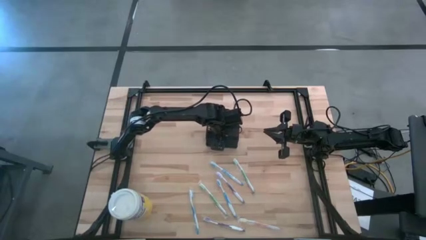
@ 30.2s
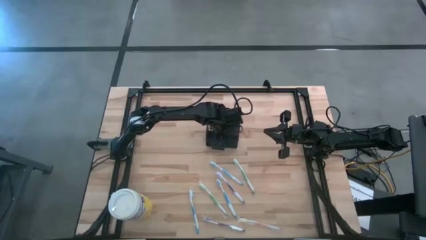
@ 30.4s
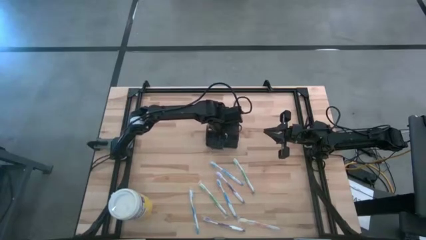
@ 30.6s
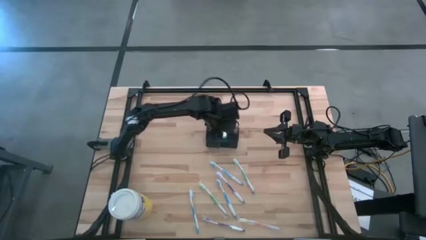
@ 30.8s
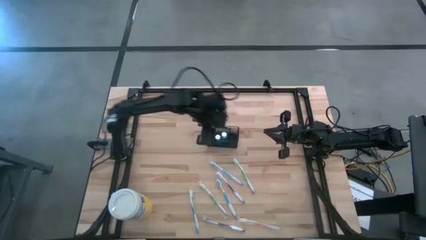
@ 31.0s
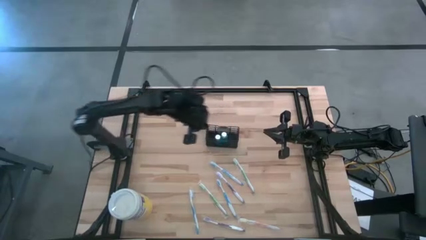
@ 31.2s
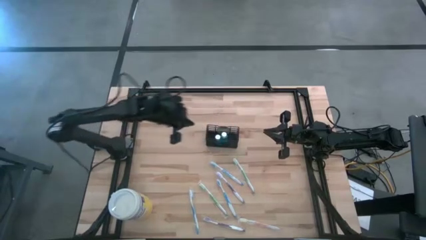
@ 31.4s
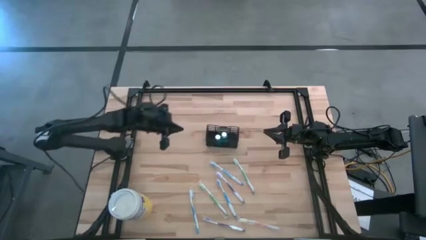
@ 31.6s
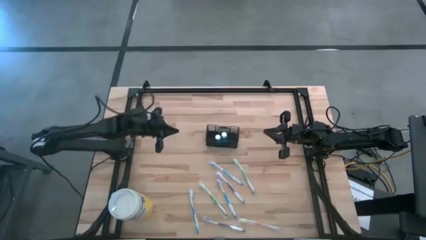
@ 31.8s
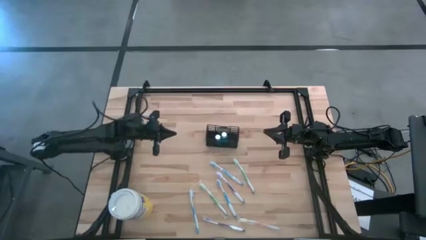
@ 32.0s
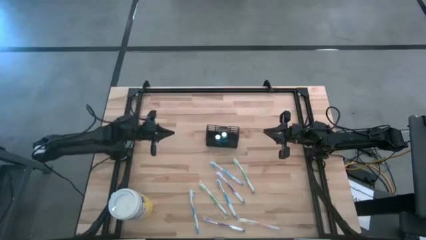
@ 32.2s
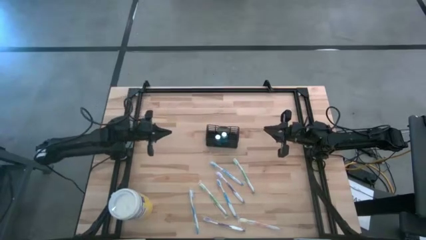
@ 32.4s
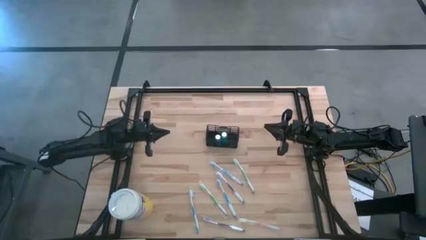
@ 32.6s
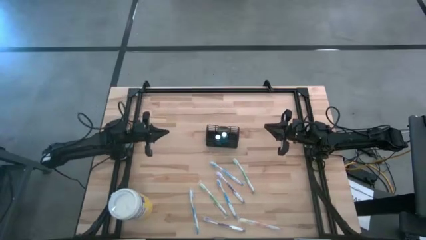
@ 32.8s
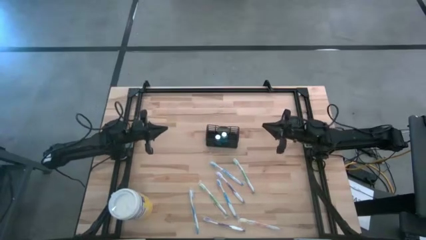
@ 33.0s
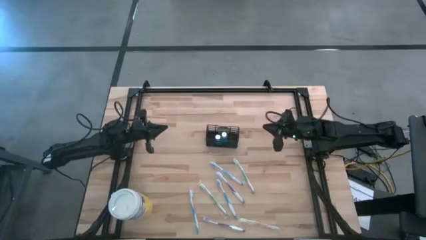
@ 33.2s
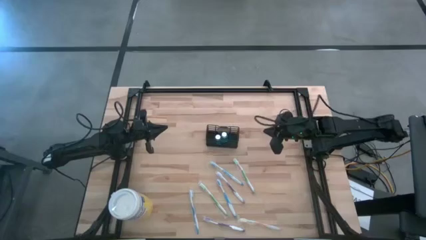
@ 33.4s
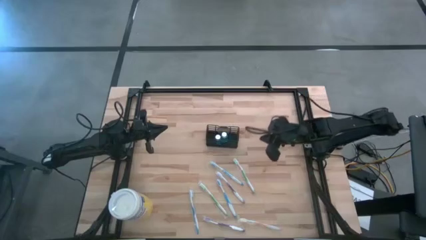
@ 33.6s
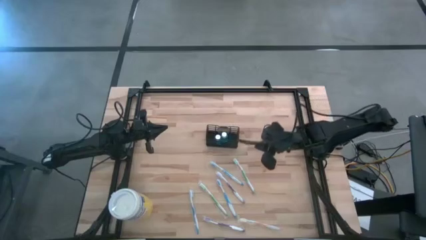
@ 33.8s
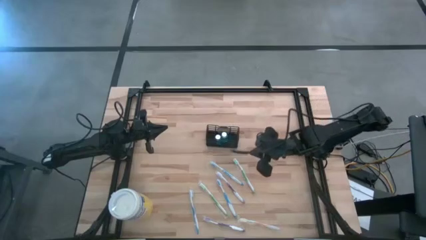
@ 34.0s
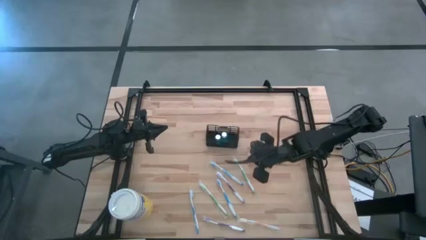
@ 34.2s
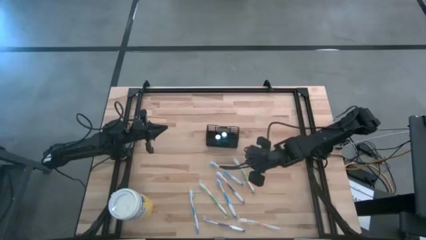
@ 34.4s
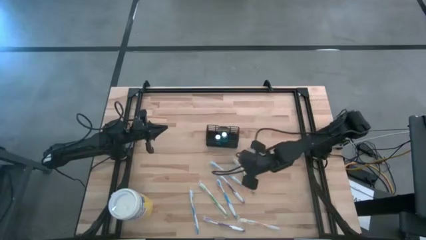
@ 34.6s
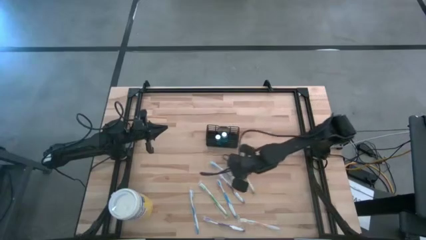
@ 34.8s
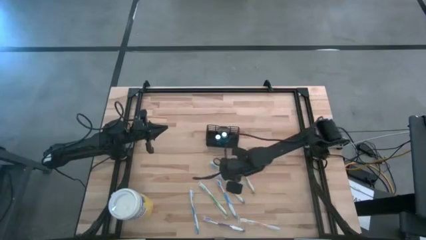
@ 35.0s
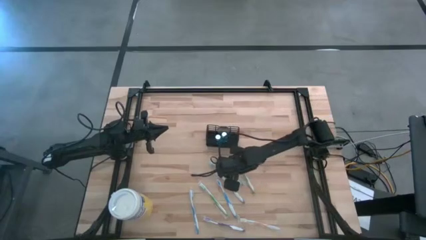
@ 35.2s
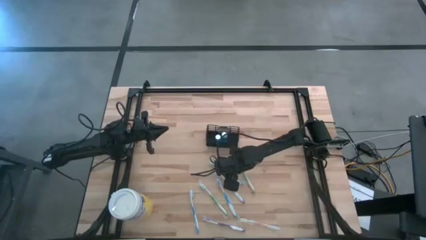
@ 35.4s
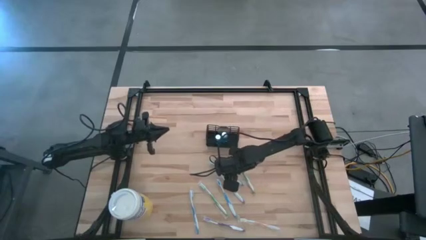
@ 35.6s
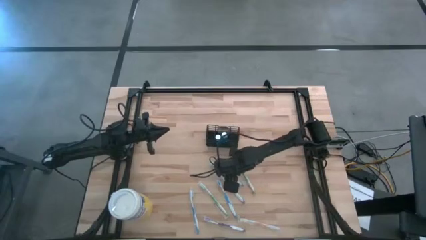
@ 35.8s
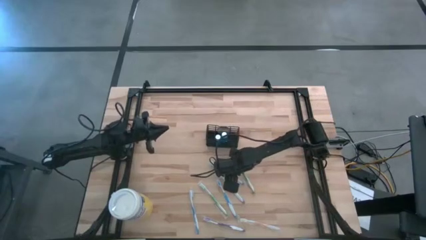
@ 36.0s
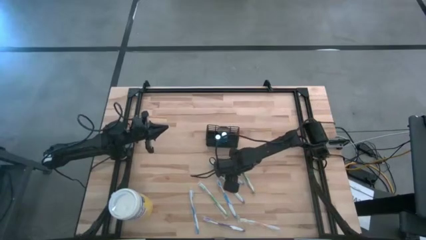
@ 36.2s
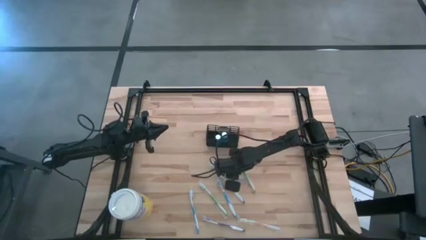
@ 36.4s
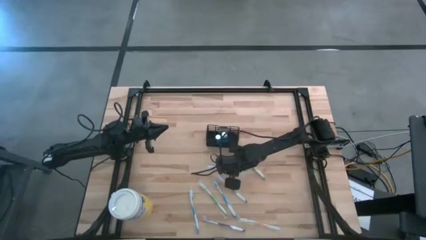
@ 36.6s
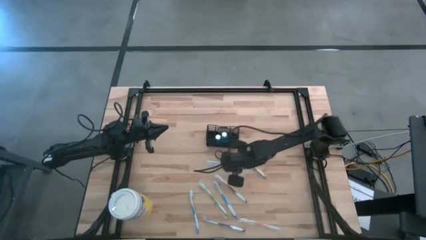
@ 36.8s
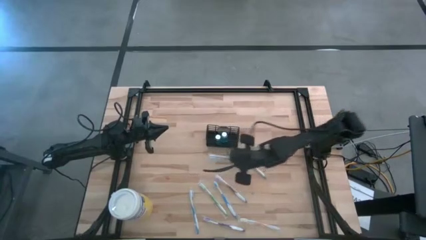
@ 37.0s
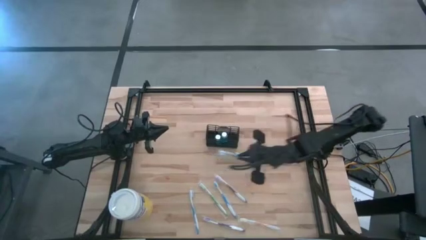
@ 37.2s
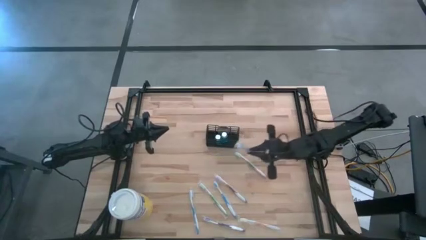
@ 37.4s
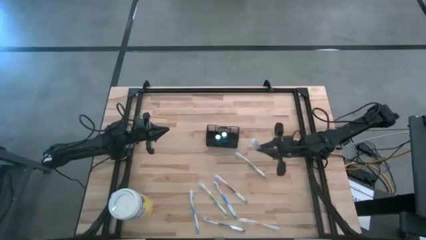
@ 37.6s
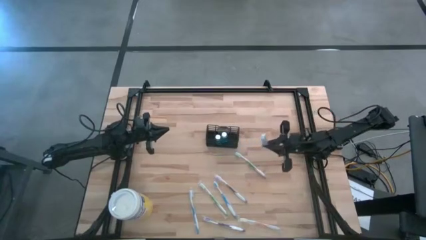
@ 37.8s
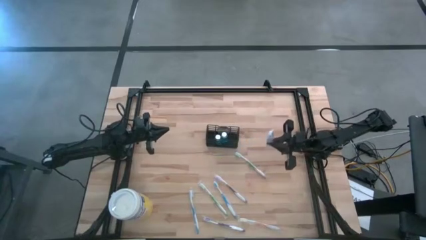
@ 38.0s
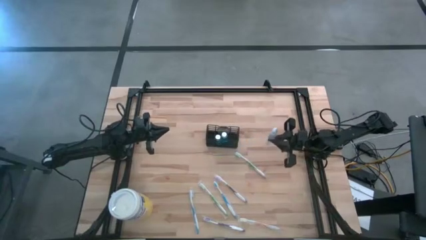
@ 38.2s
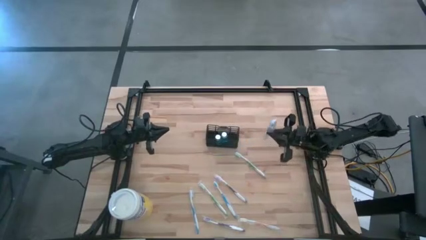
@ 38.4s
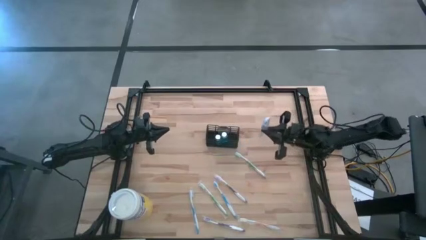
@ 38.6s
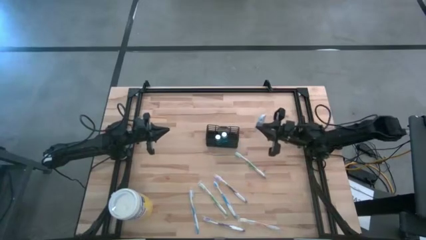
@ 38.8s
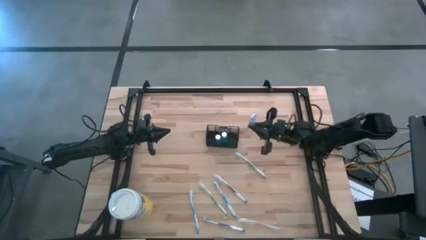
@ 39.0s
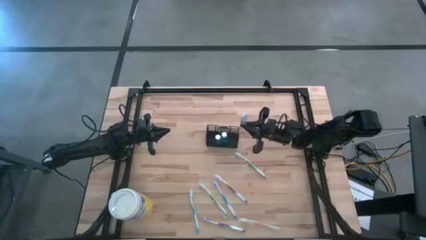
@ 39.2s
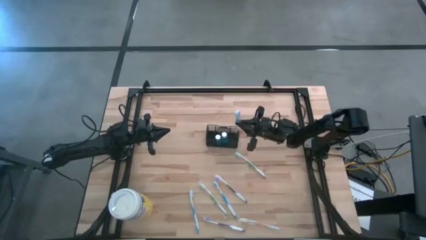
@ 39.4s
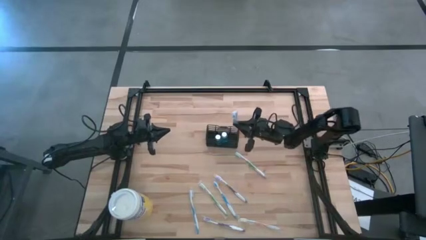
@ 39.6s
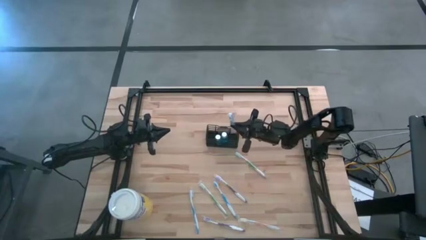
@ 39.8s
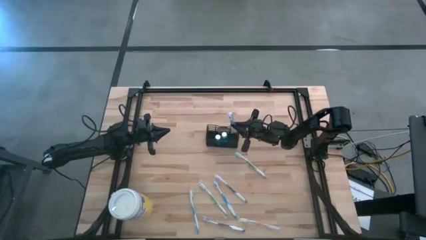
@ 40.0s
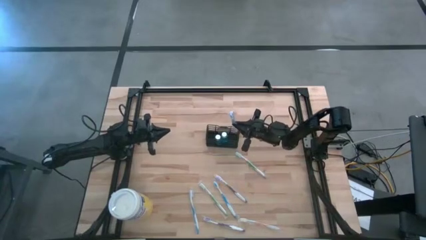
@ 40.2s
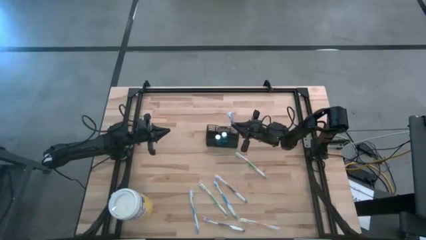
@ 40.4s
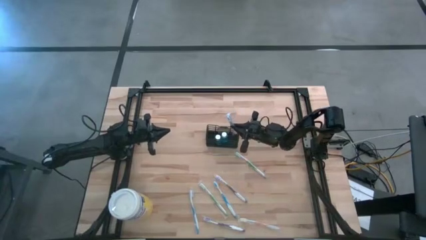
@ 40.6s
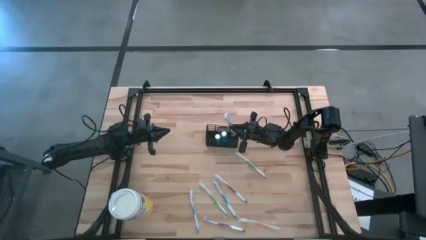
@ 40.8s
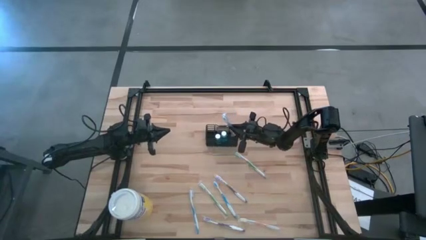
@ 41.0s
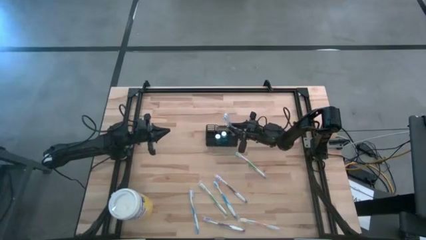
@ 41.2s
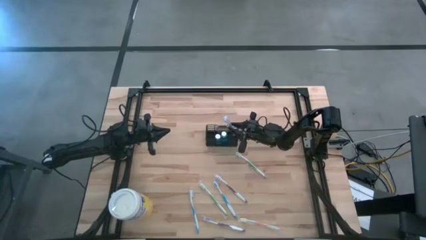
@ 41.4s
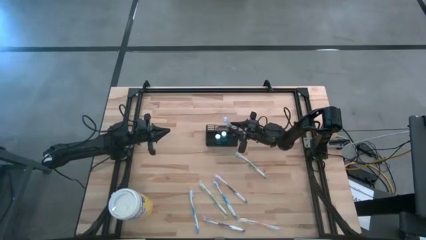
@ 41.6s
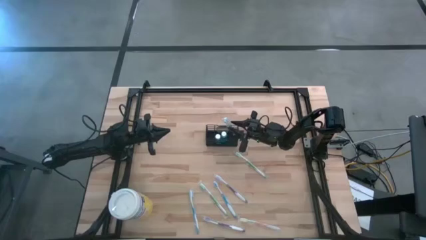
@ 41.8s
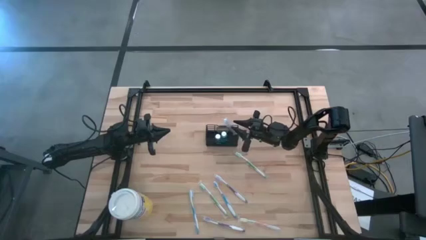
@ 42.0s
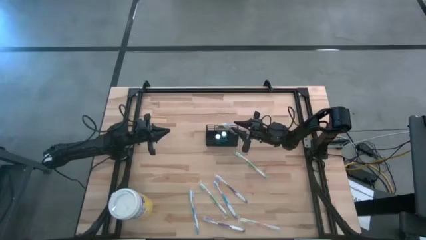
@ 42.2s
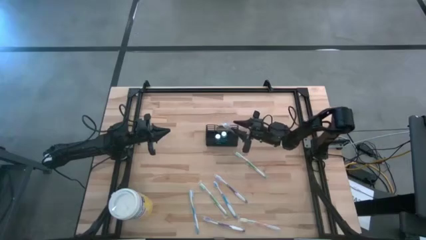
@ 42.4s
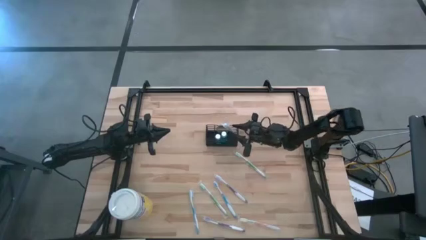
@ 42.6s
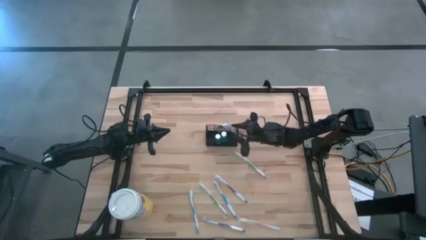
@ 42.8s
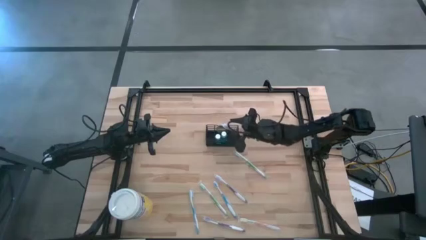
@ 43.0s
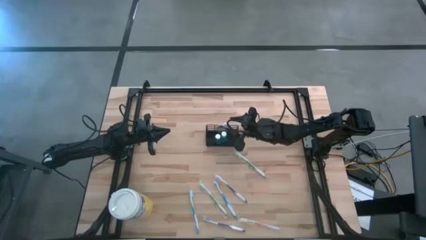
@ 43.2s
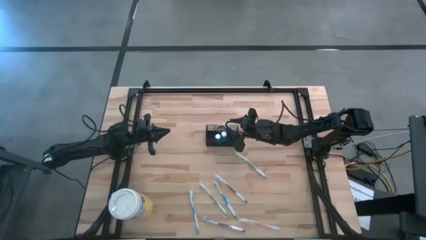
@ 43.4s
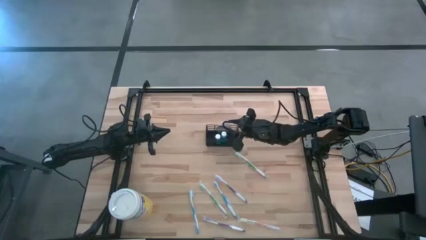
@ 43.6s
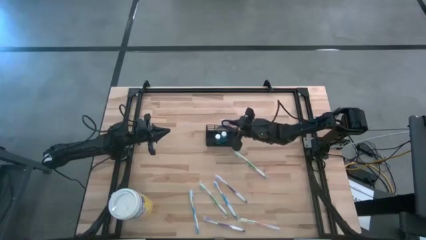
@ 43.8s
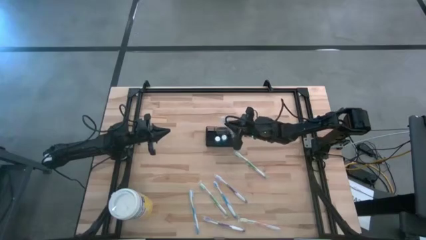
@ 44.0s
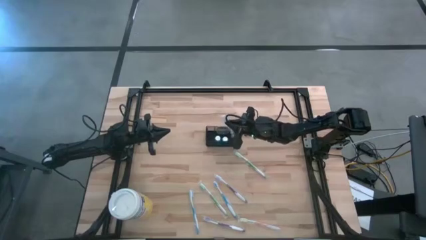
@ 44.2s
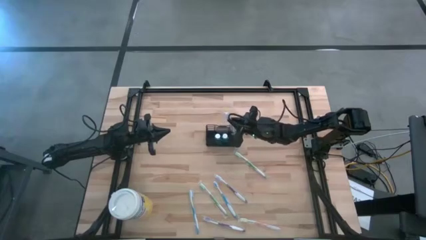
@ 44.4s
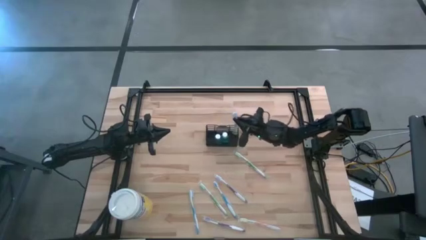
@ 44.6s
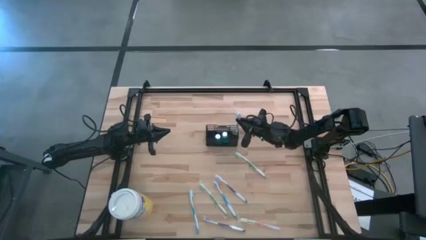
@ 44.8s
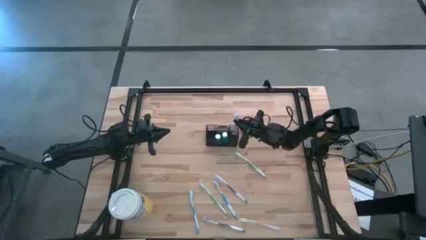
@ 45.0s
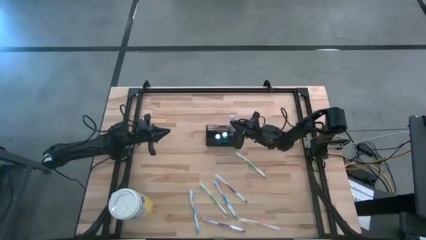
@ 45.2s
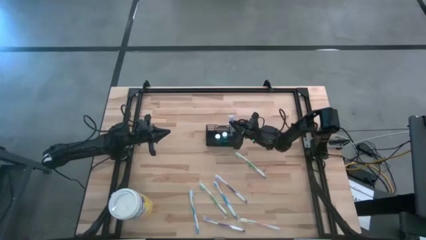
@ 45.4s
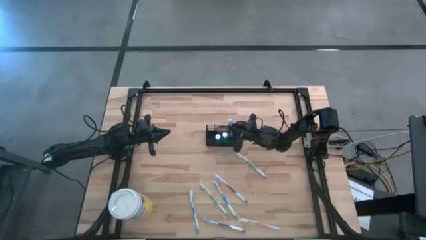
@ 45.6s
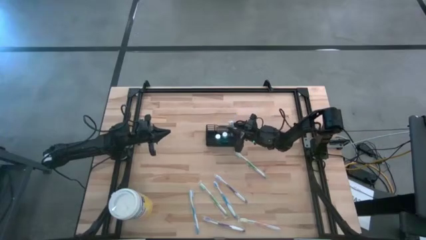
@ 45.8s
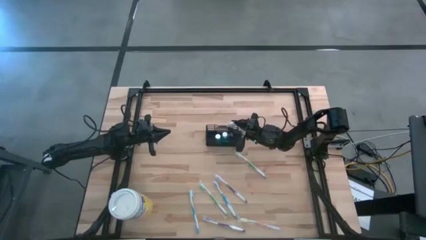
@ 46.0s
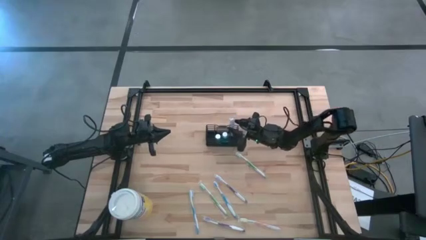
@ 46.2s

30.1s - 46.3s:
Task: Pick & Place toothbrushing station
Put the top blue toothbrush into the wire organizer

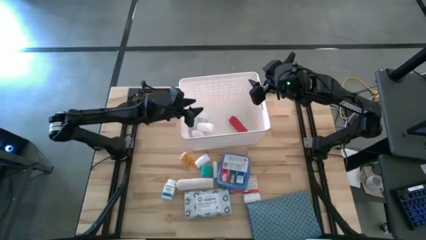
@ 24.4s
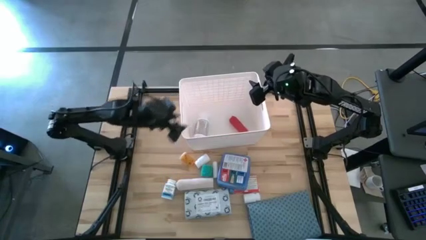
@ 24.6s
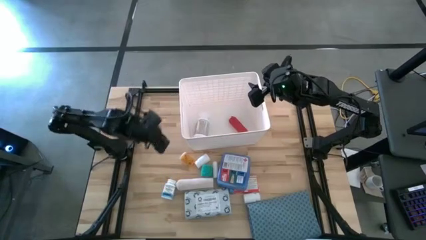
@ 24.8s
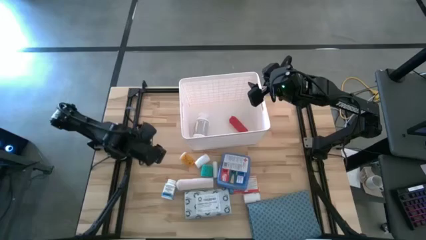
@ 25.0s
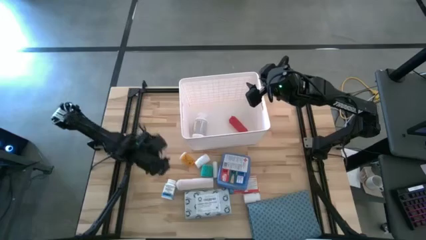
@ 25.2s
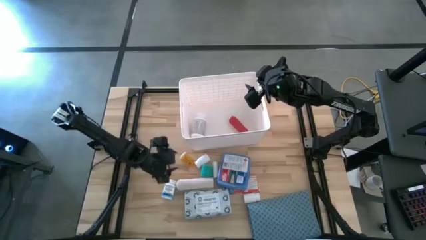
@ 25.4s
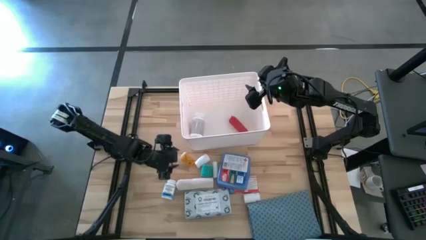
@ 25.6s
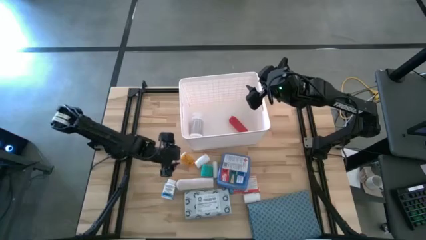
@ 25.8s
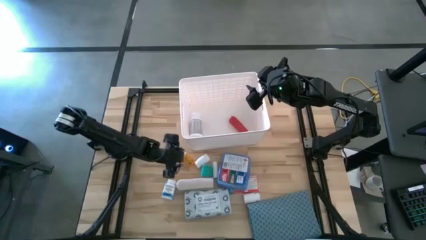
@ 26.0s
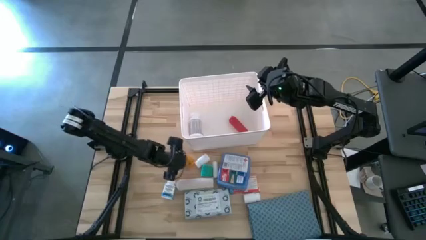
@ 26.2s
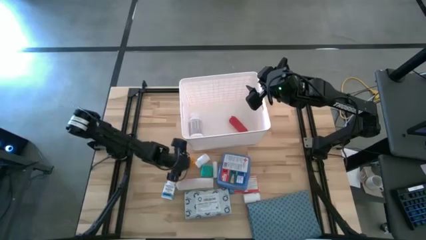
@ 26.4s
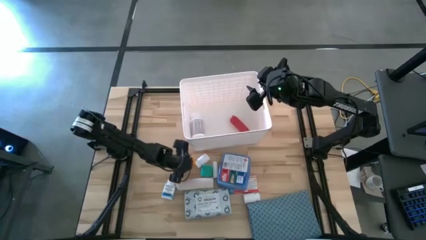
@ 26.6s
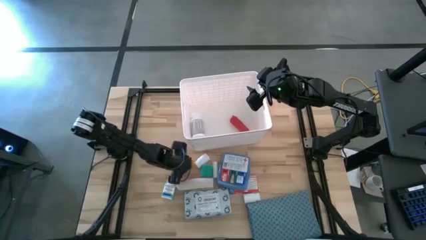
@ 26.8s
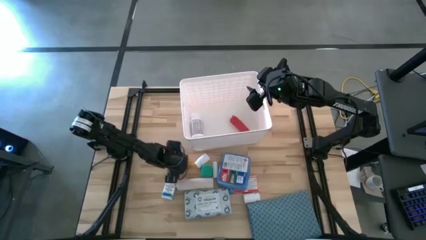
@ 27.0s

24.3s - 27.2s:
Task: Pick & place medical supplies in basket/bin
Put the orange pill bottle into the white bin
